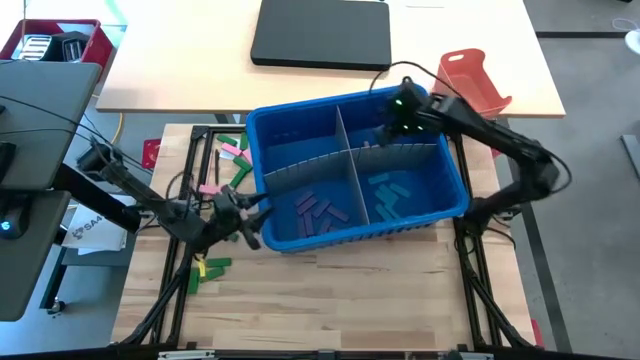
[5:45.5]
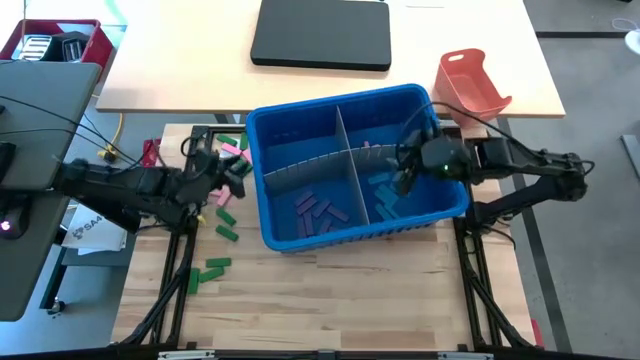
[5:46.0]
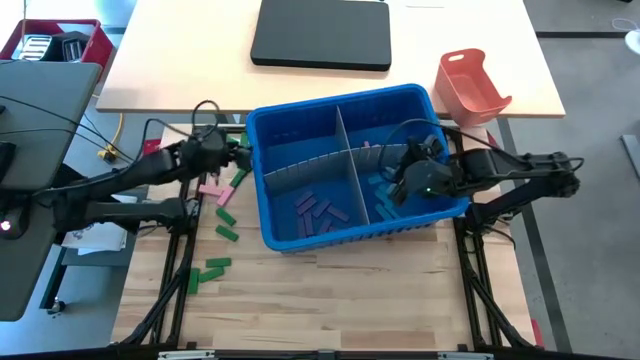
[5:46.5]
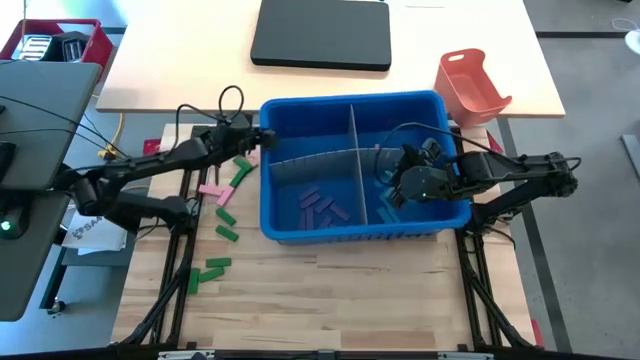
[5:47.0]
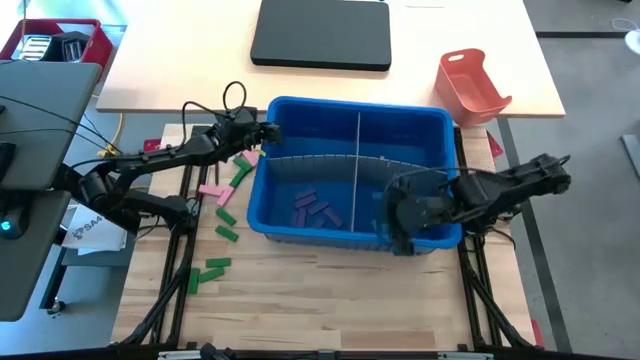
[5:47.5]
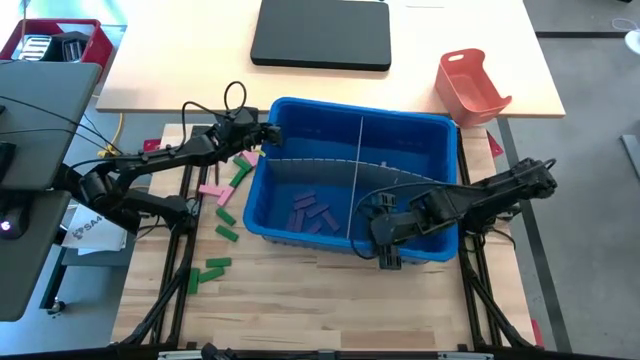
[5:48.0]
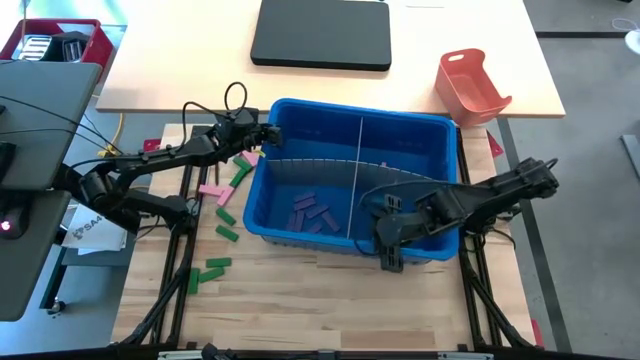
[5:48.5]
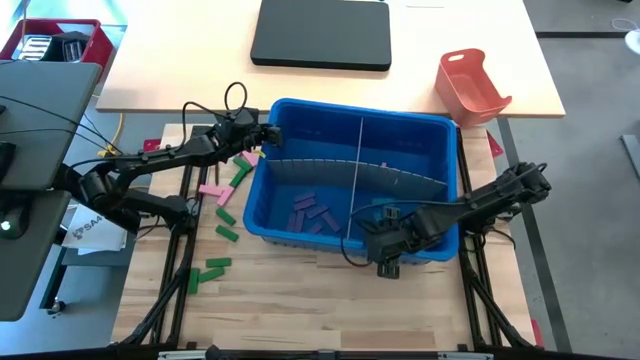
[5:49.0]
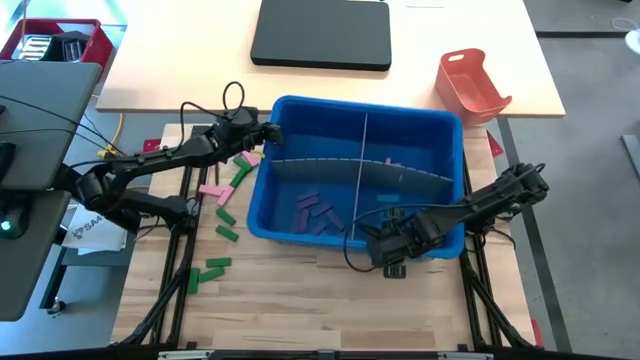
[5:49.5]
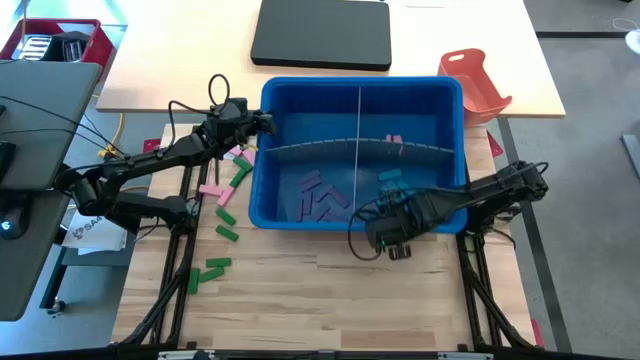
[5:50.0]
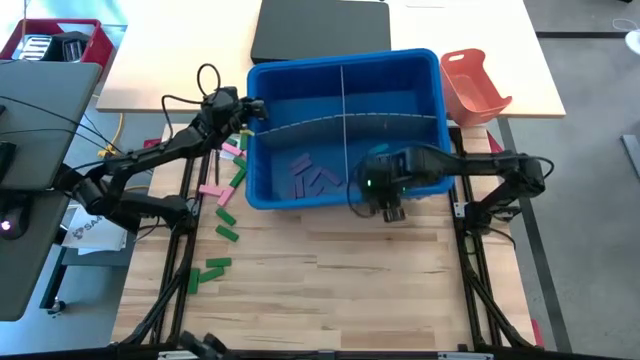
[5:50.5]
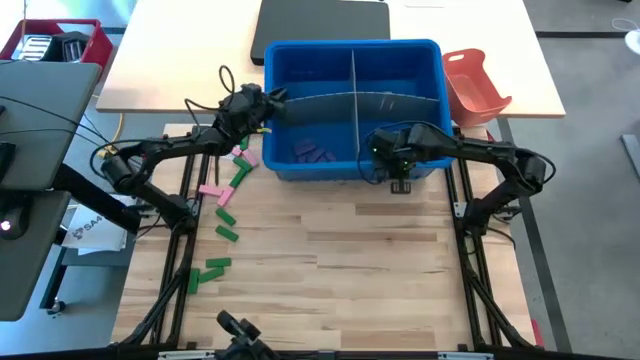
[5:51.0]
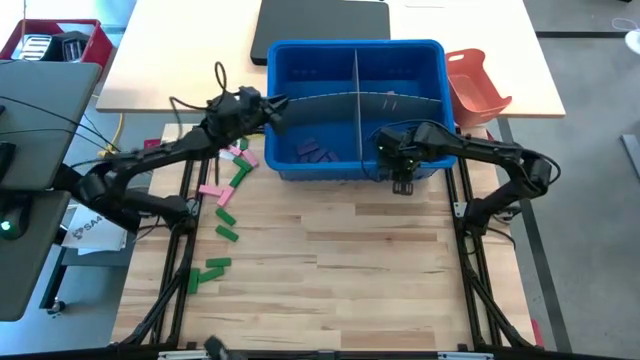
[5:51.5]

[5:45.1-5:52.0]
Task: Sort blocks
Adjust the blue bin

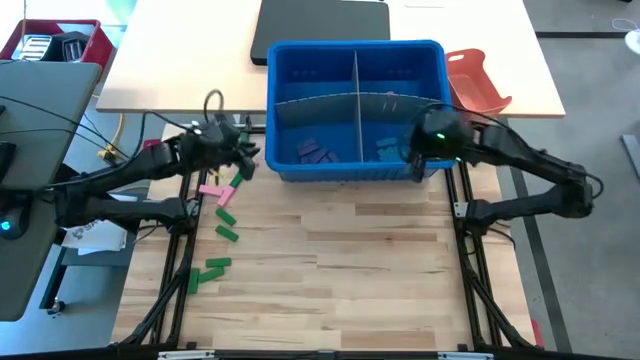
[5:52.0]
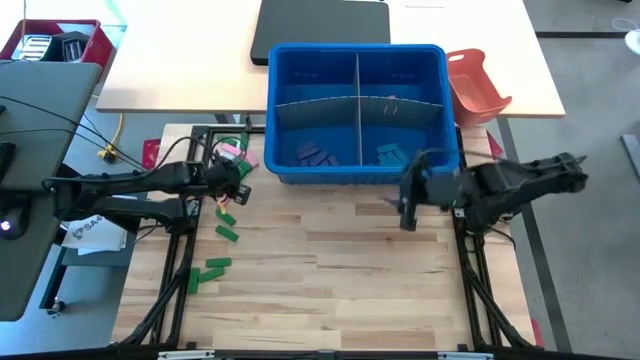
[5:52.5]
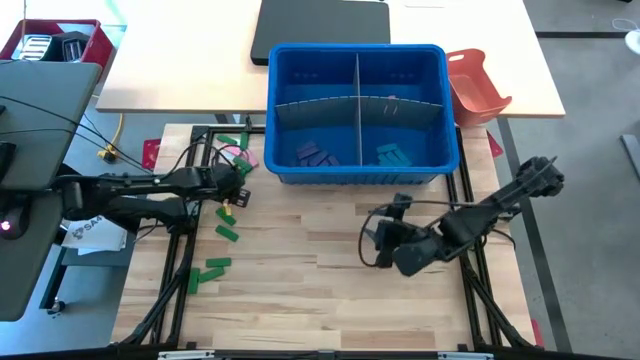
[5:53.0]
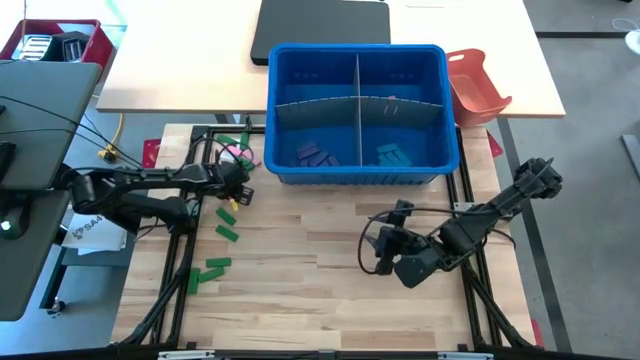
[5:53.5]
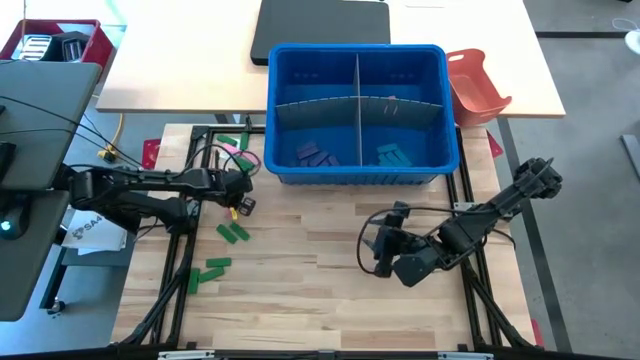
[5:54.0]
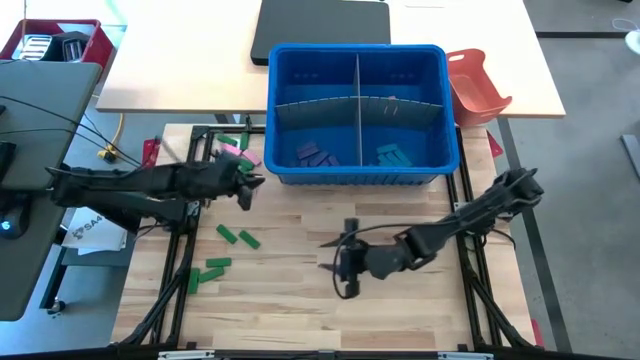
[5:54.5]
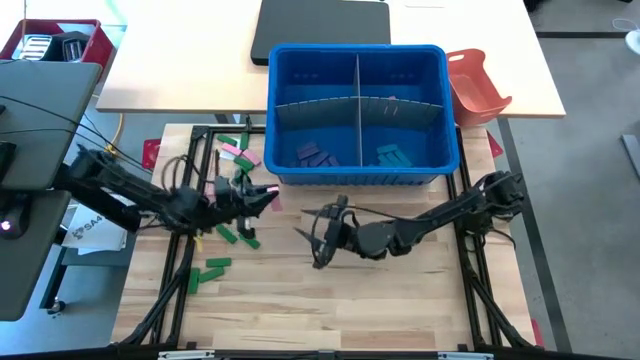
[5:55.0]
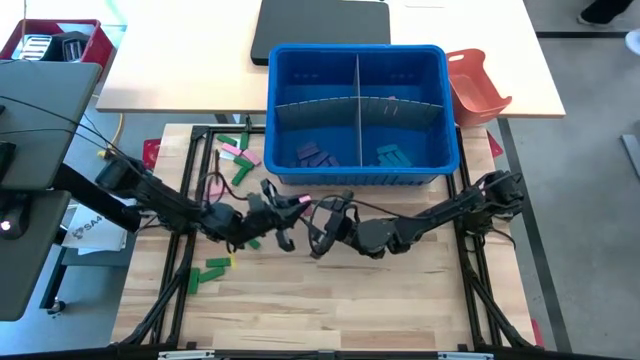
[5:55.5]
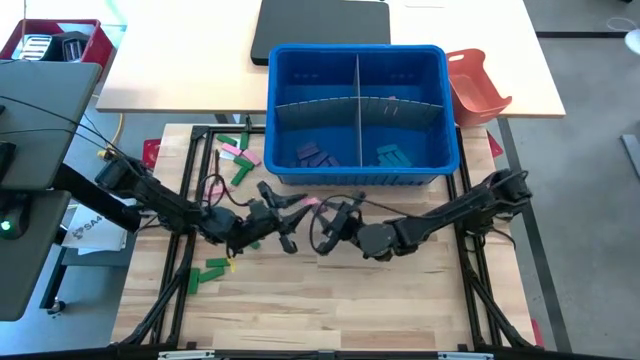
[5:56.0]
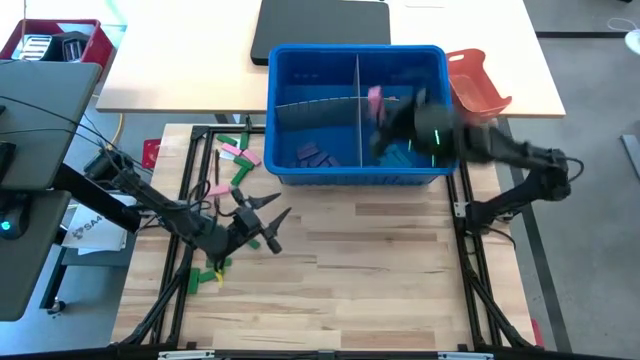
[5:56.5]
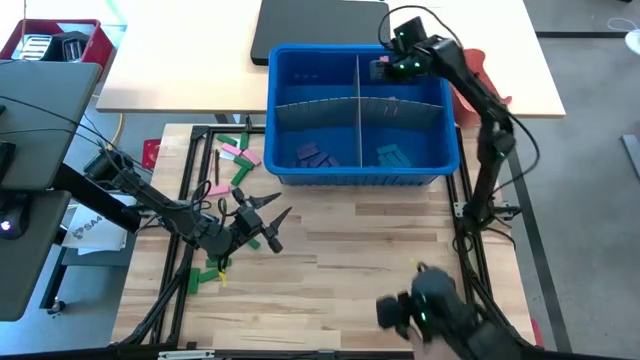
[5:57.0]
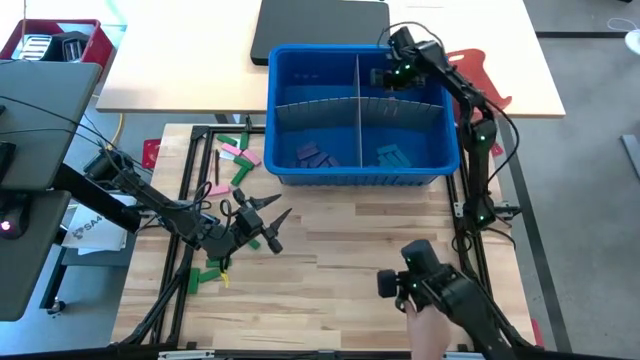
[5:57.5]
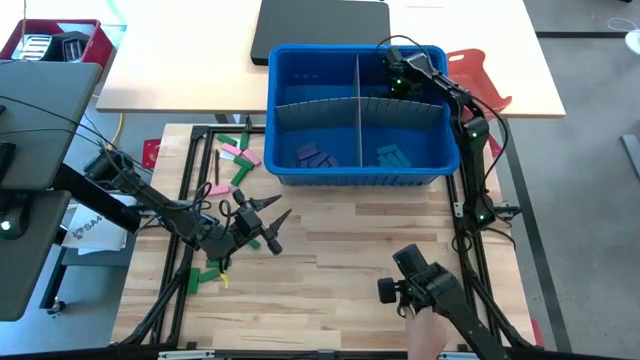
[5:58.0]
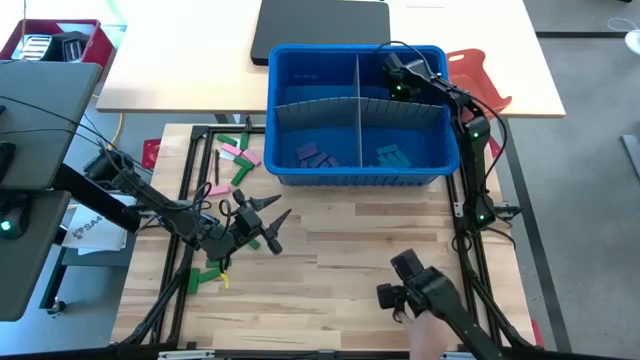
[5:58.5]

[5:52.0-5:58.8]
Put the pink block into the blue bin with the other pink block

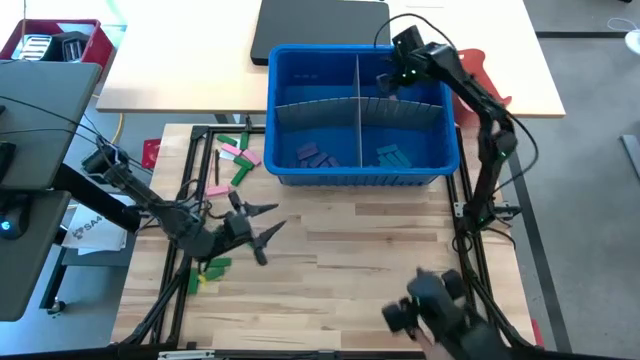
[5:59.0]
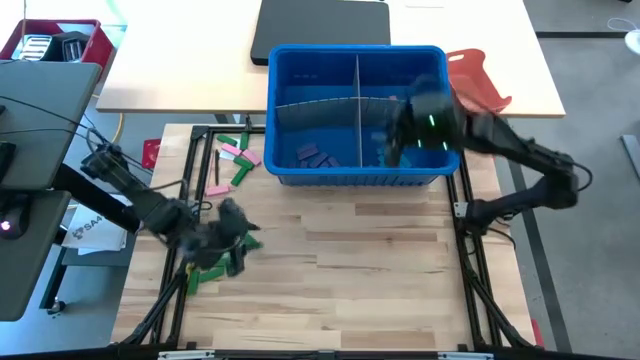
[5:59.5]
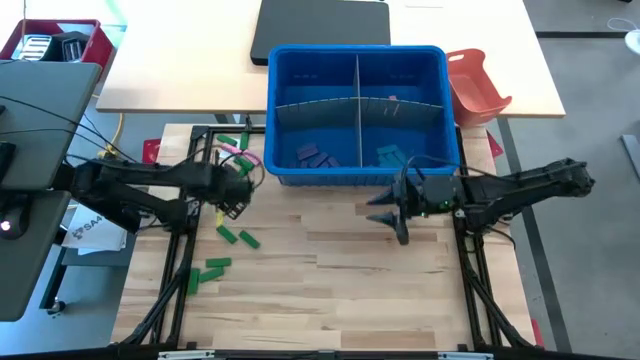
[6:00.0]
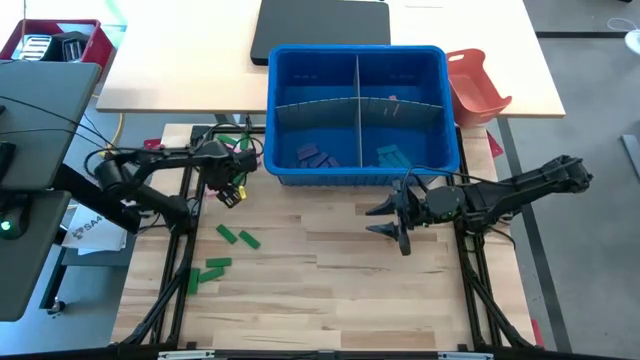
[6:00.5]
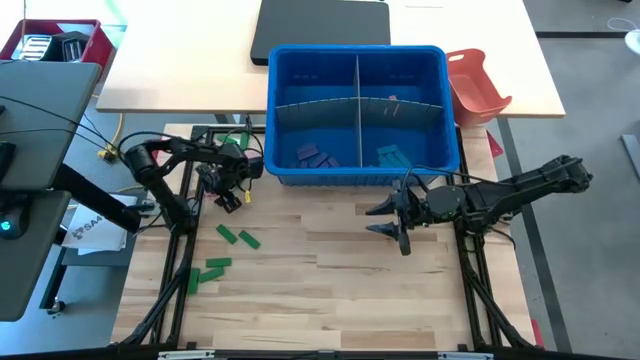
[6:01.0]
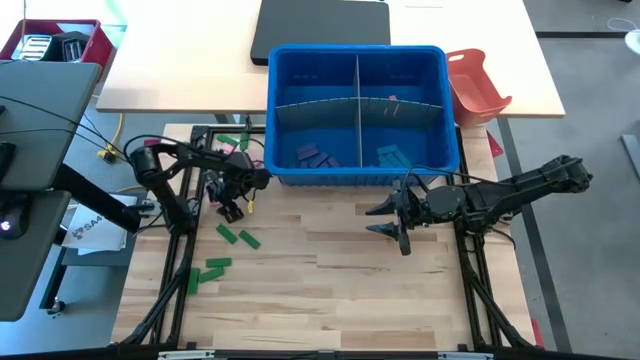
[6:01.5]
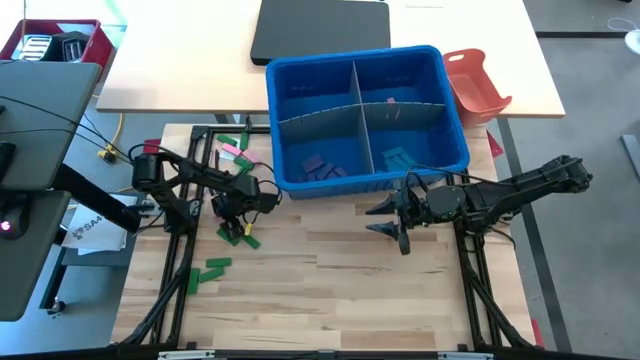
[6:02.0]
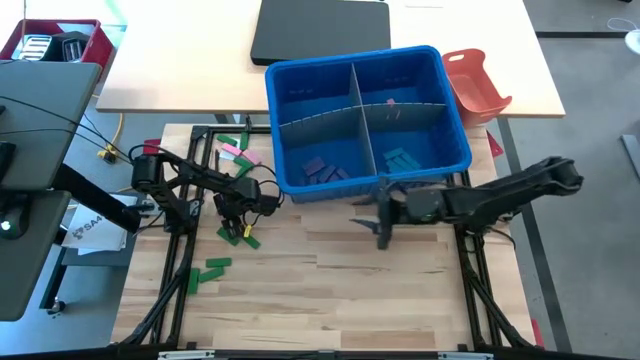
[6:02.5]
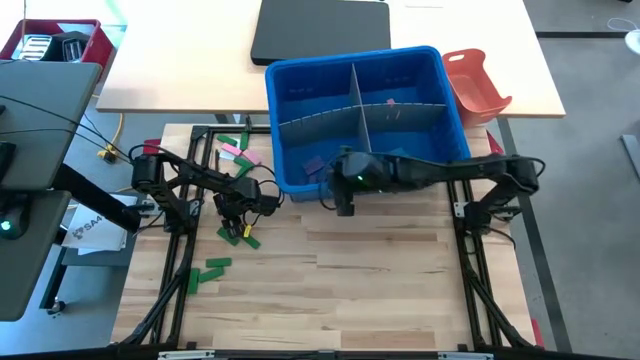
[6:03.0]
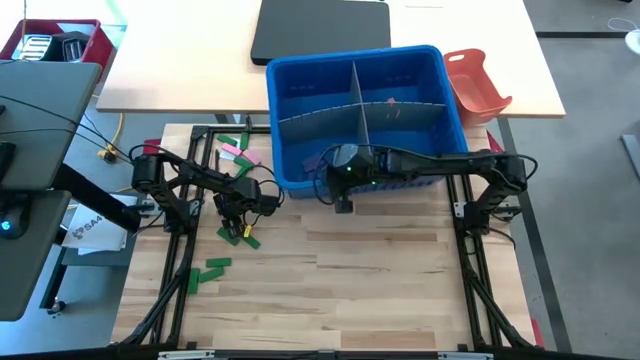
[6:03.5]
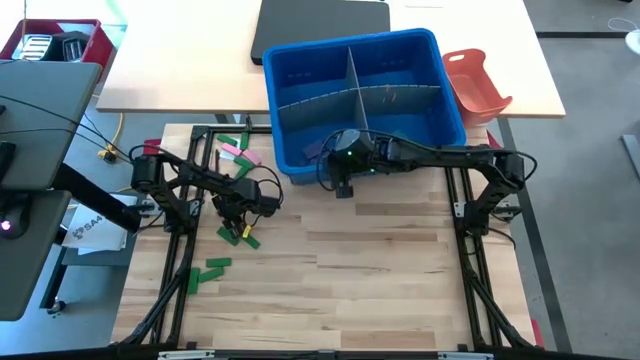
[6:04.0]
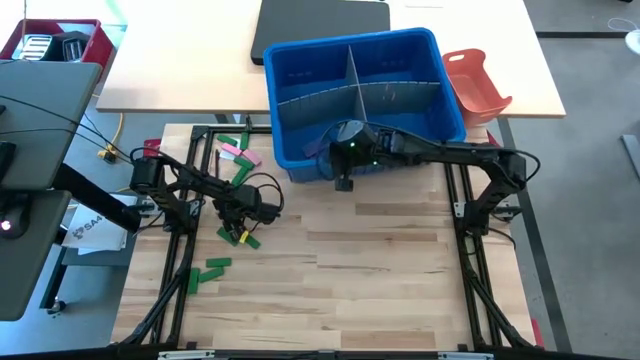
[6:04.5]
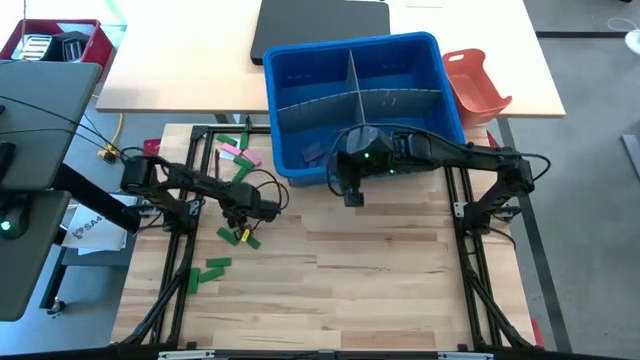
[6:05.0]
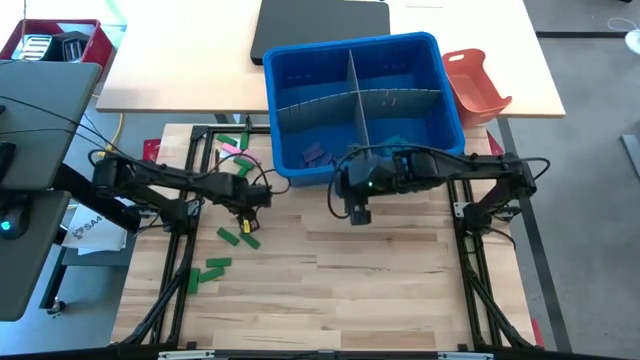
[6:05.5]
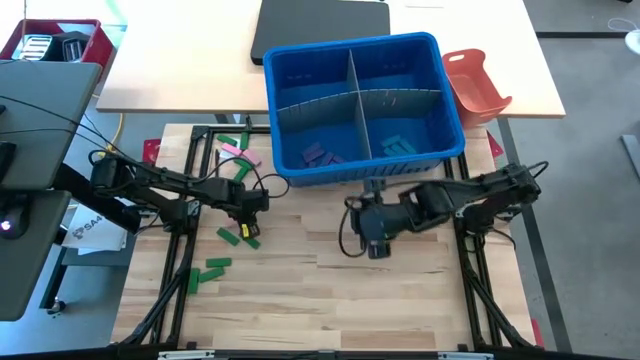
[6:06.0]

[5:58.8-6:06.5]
Put the pink block into the top right of the blue bin
